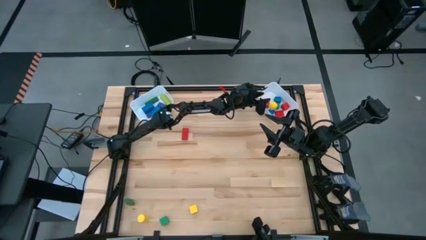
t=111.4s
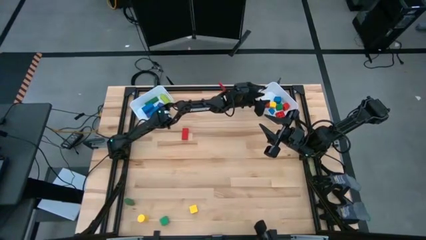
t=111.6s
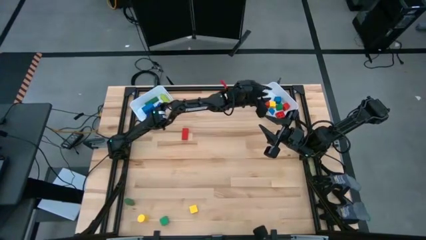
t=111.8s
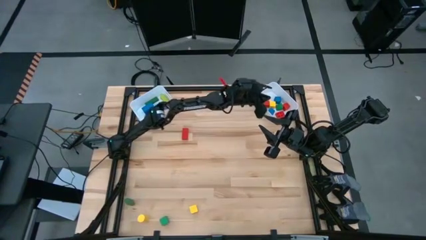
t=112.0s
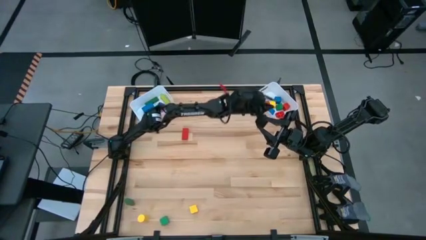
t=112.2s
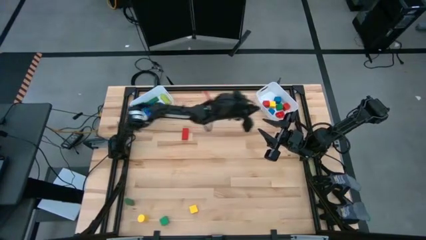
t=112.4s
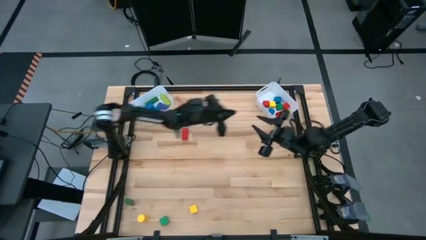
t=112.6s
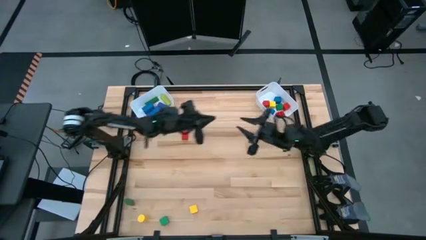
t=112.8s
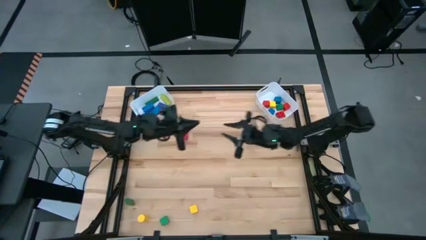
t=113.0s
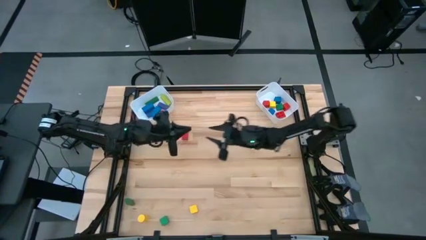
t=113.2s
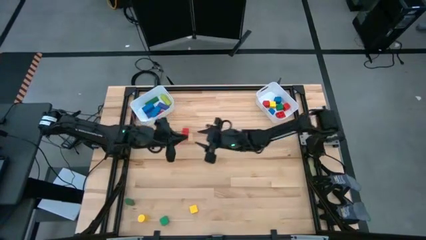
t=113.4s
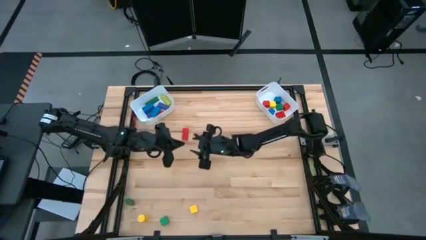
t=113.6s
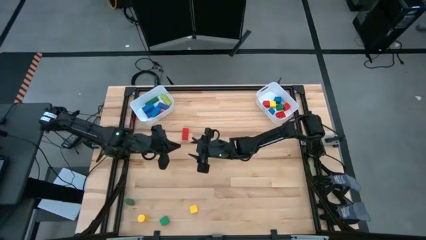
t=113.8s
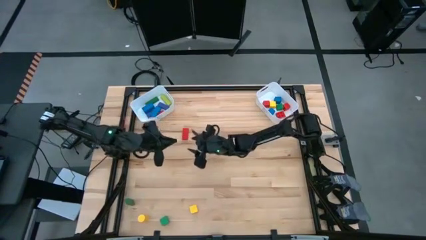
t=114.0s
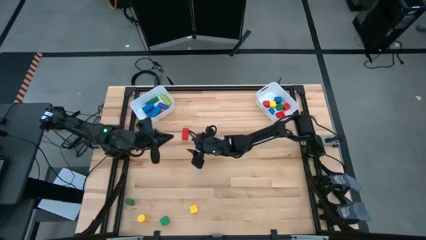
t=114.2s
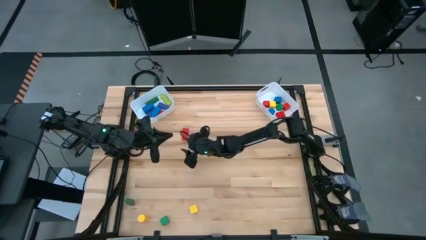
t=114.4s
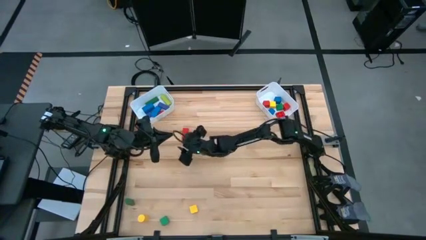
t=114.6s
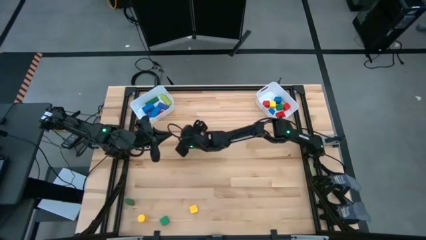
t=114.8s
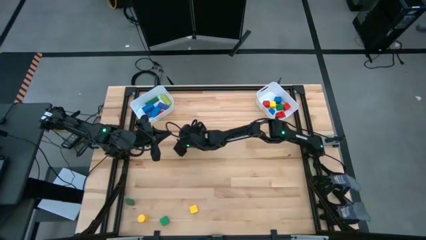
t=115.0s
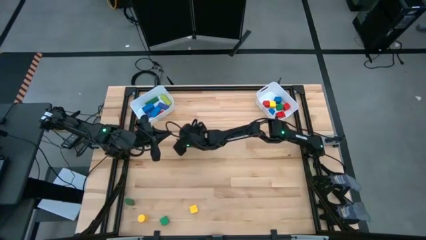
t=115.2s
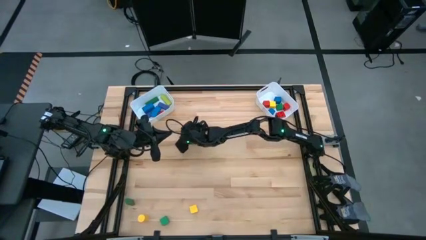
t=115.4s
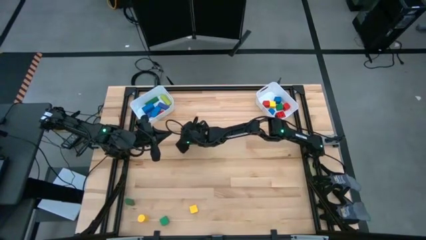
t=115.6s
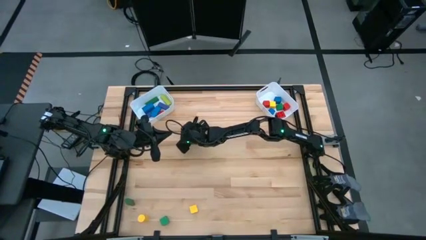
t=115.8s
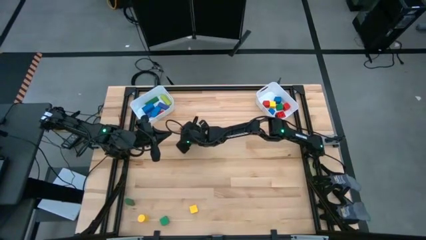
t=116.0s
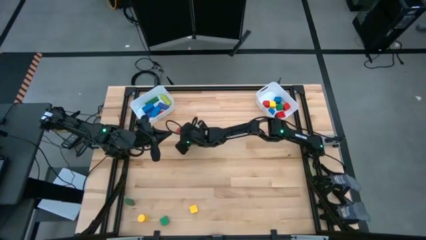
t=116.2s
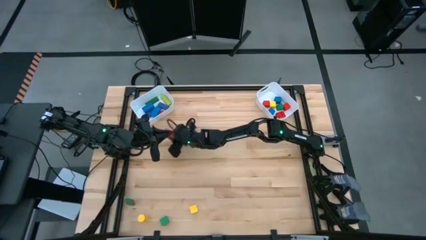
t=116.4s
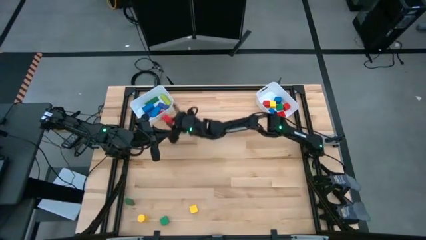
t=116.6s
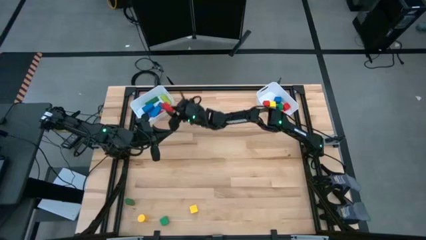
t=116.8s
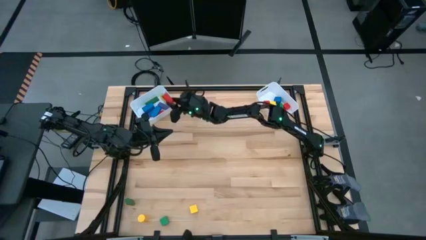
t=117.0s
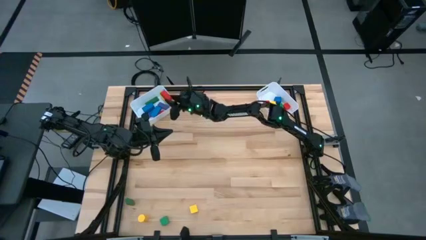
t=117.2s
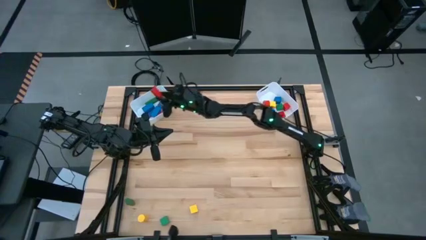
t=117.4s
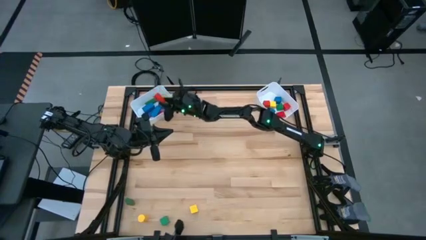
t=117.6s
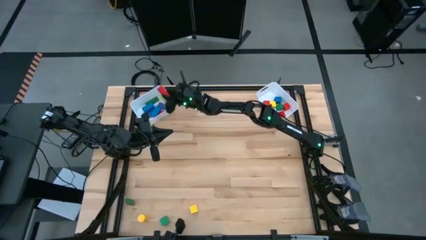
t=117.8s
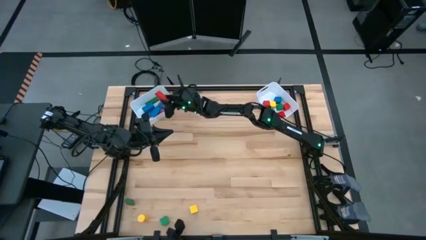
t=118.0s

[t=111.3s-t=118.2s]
Task: Sort blocks by size
Put the large red block into the left white bin

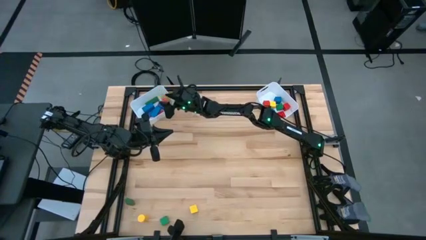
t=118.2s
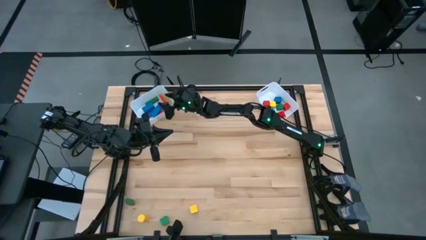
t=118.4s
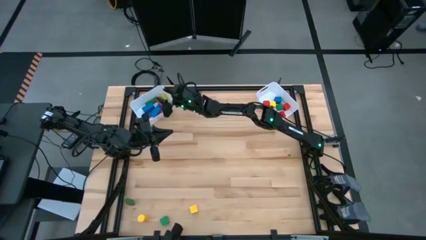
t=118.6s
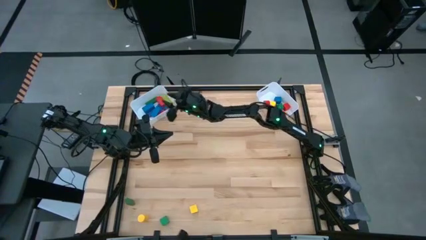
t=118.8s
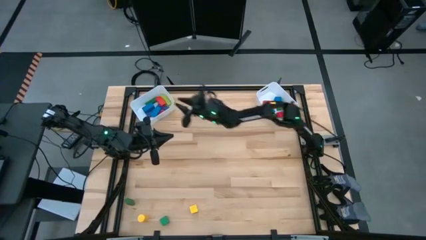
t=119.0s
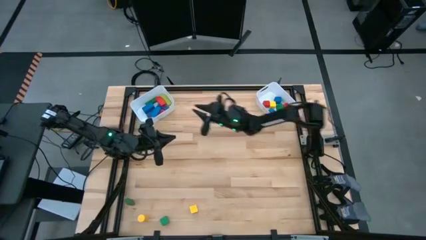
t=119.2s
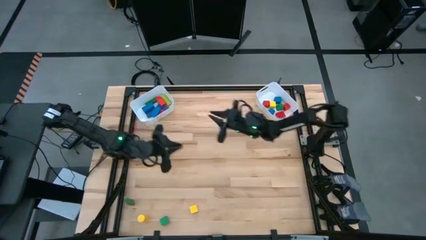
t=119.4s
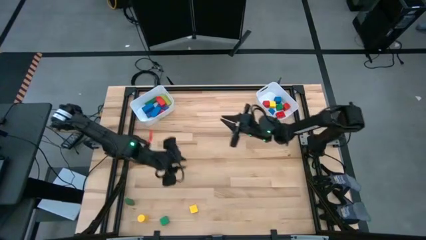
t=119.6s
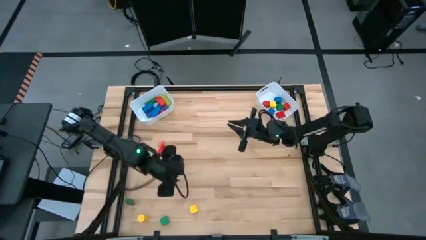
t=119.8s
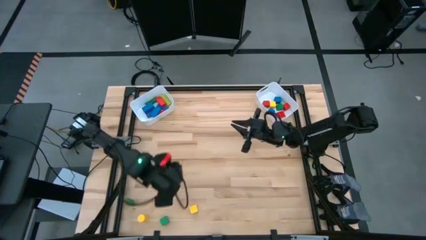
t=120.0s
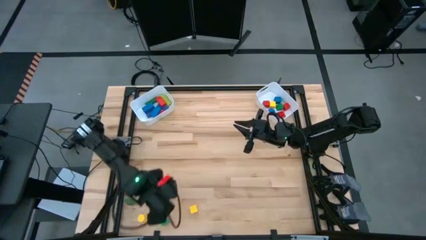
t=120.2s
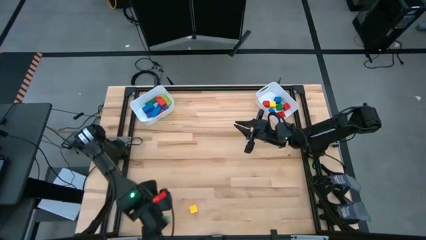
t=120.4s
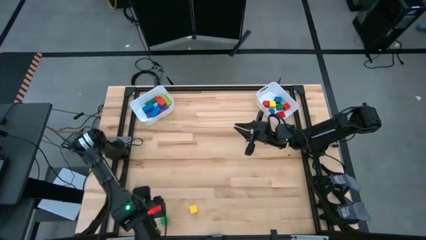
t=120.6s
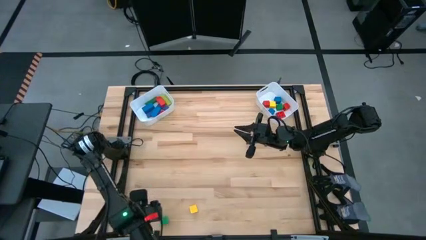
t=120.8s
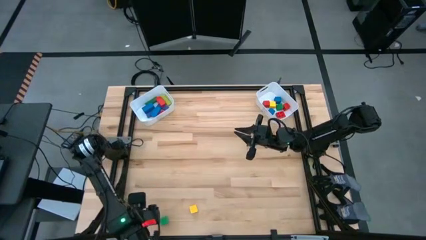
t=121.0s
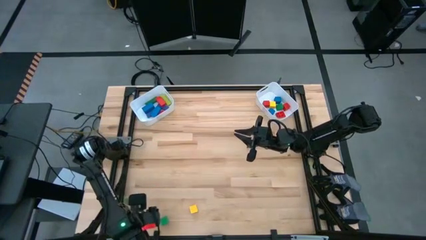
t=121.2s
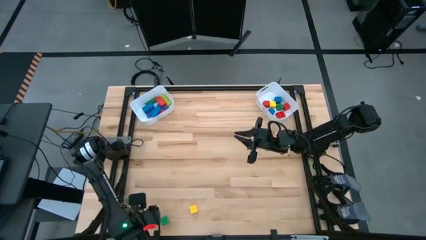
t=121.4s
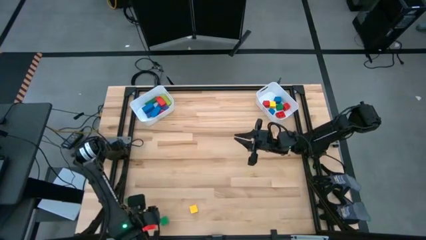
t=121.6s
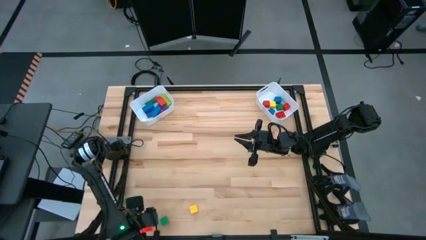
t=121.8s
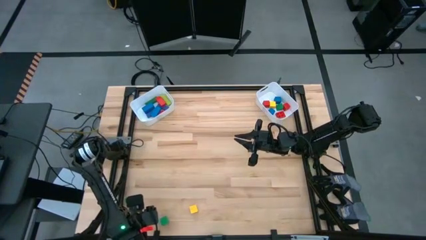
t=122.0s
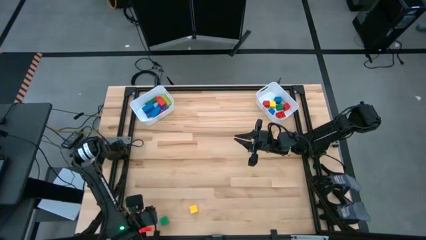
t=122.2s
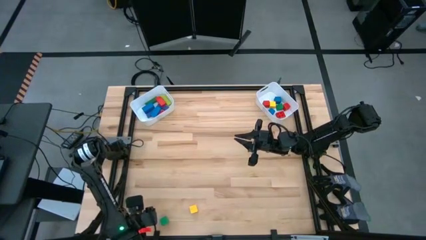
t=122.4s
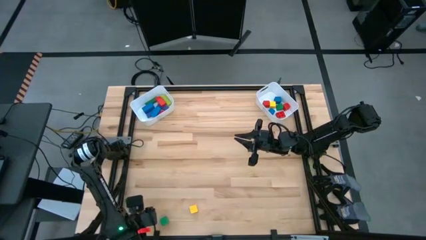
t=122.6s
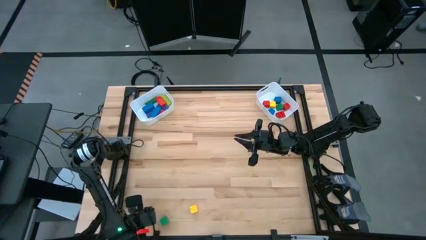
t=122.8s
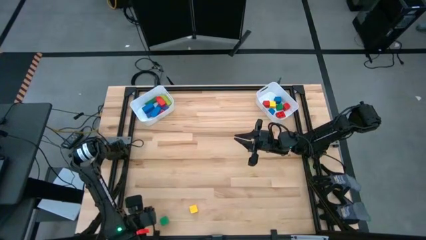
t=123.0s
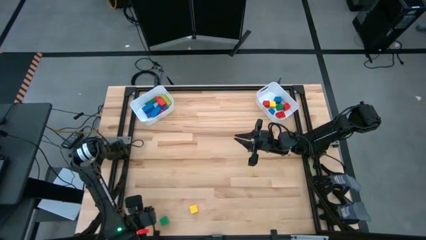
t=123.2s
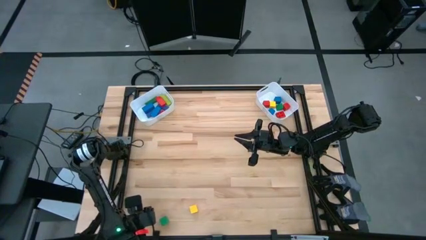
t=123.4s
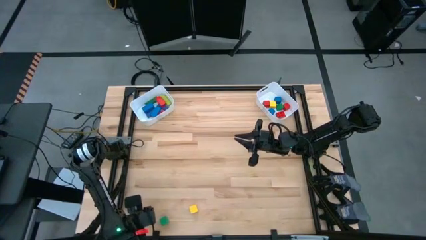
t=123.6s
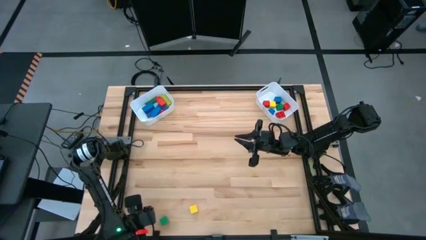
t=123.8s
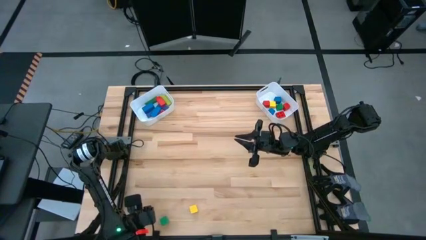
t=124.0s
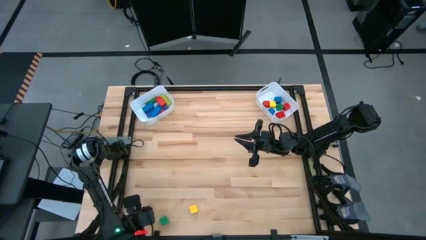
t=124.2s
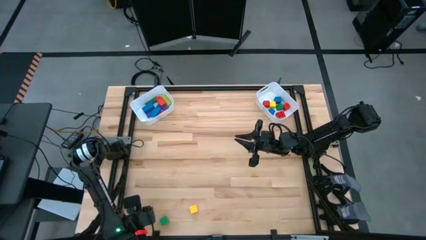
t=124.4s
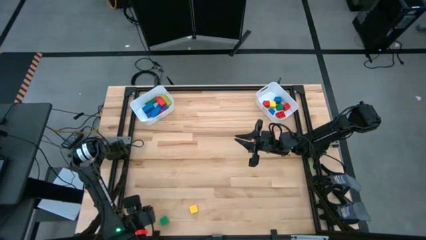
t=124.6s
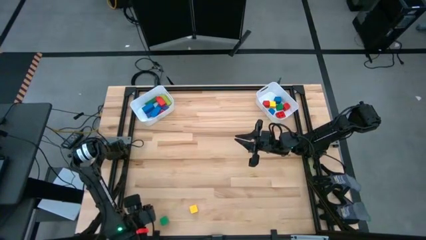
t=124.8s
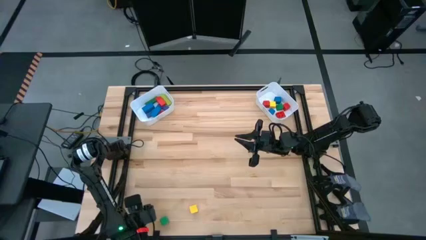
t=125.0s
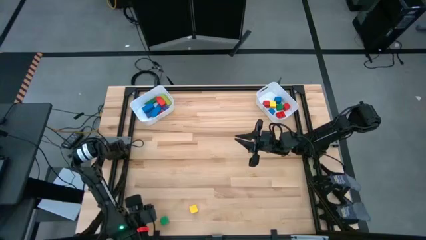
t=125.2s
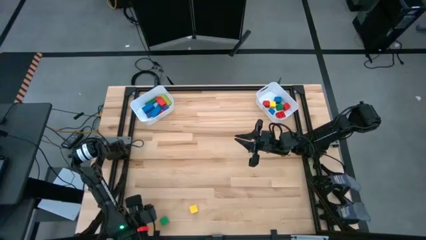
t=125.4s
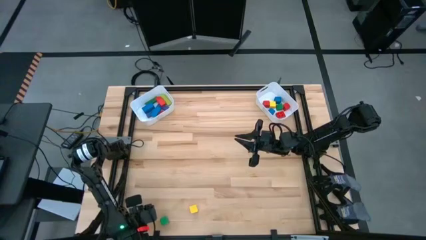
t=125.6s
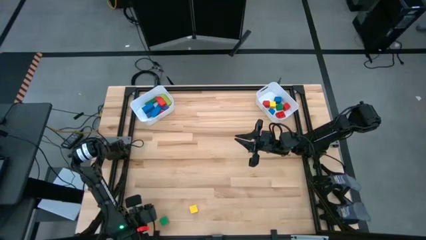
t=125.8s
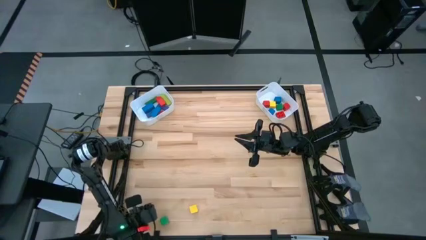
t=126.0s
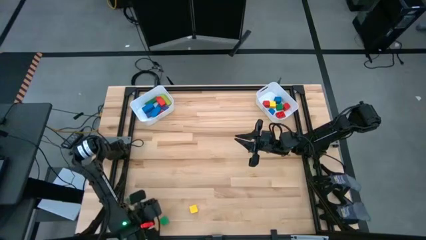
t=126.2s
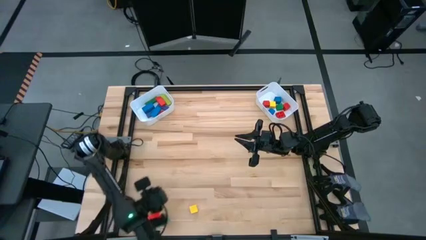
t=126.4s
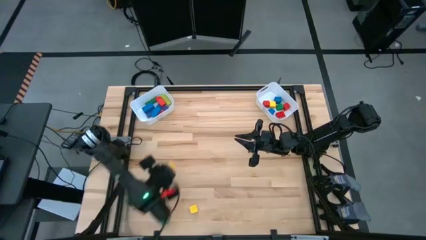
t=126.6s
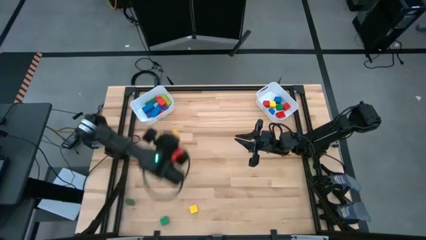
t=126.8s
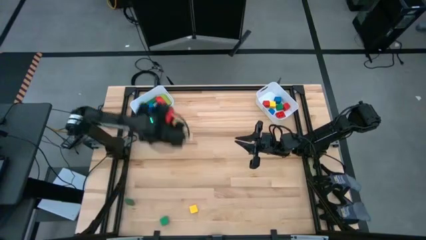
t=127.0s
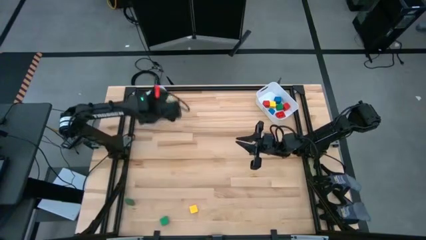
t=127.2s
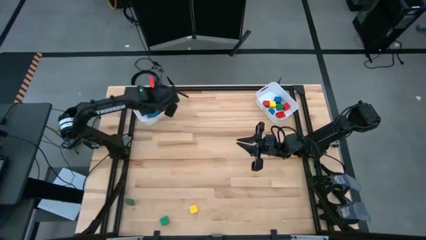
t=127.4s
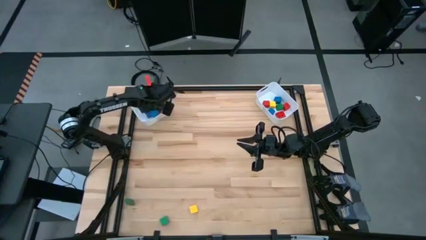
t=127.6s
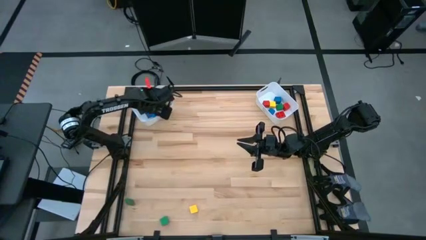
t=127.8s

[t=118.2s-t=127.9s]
Put the large yellow block into the left white bin
